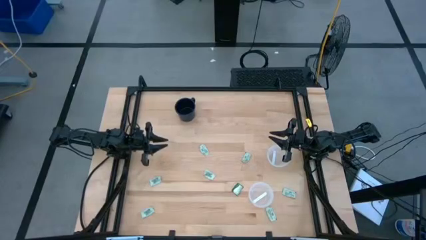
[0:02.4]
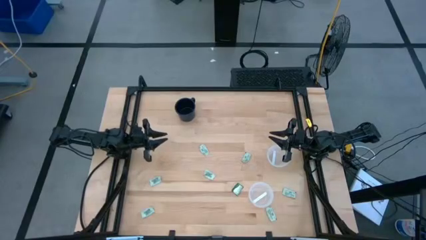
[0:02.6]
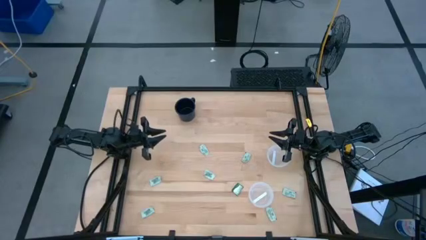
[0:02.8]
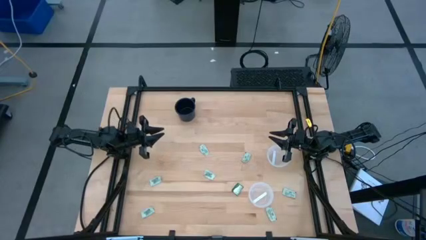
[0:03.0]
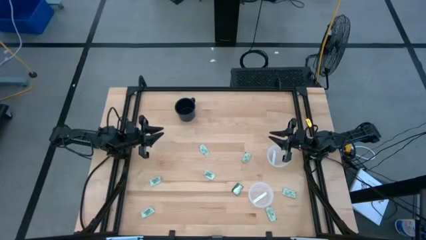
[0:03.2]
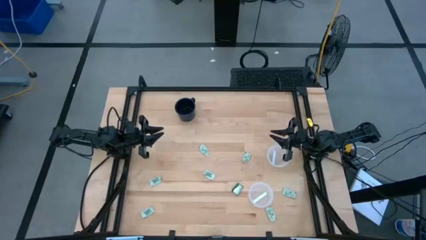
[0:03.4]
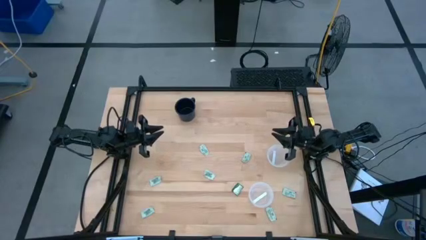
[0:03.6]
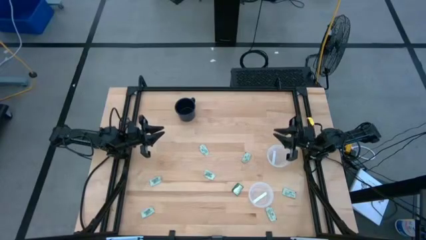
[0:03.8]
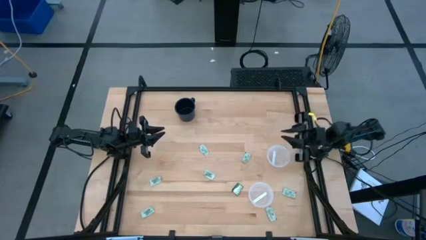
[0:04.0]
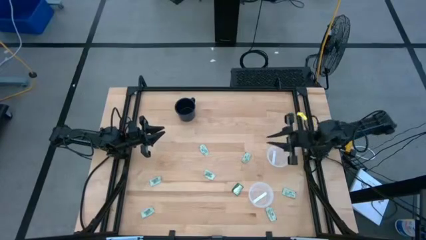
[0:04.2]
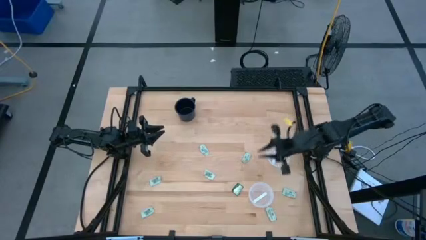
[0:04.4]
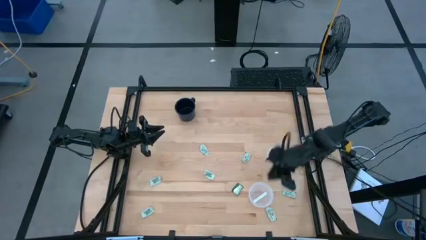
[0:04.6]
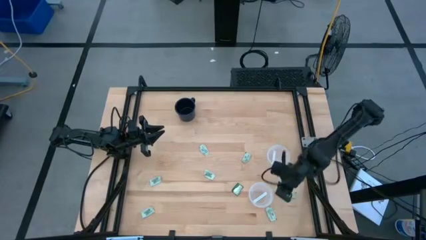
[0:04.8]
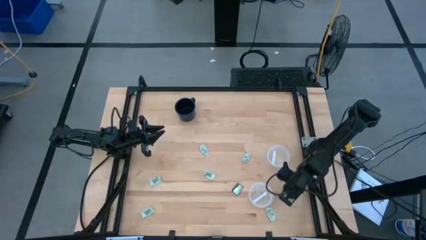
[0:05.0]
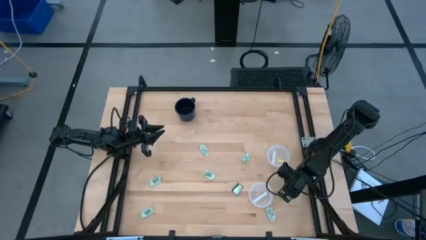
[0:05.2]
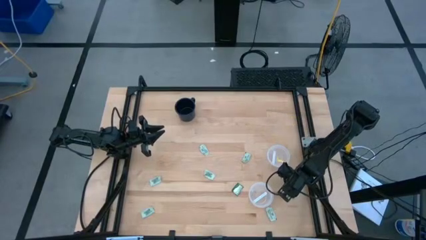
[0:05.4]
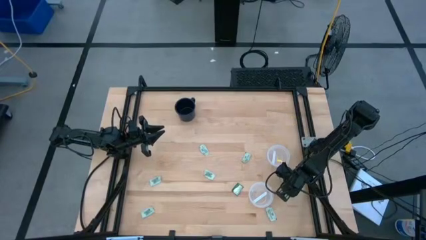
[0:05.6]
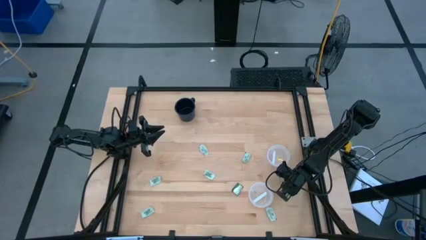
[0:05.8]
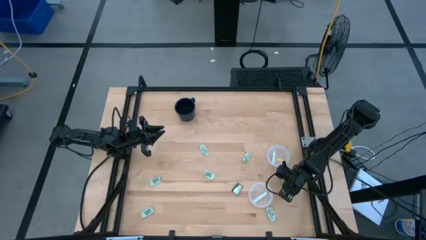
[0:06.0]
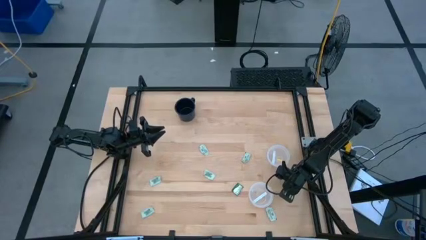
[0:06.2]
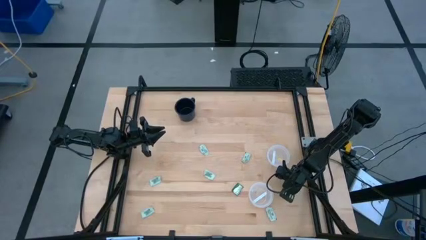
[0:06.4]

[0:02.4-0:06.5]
Task: Pick and place items into bin
Put the white stevia packet into the top bin

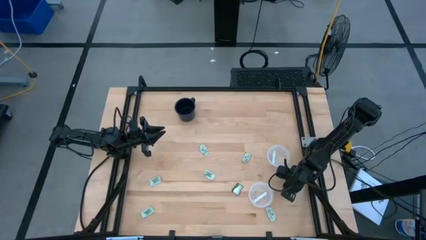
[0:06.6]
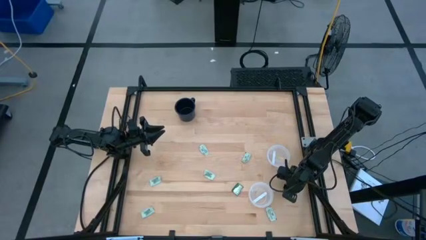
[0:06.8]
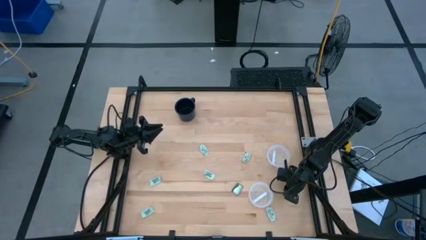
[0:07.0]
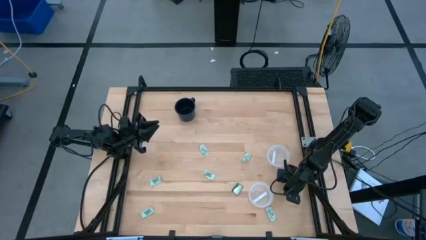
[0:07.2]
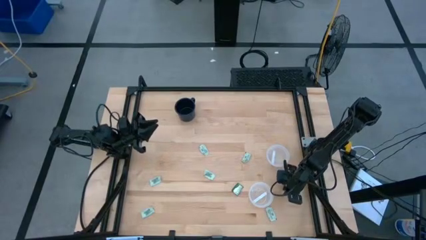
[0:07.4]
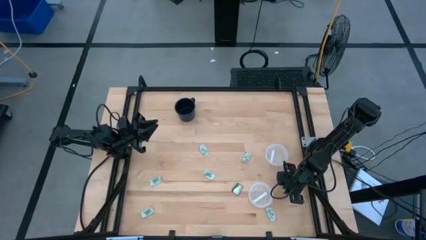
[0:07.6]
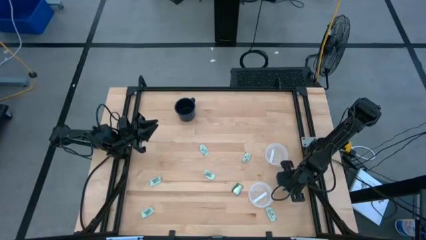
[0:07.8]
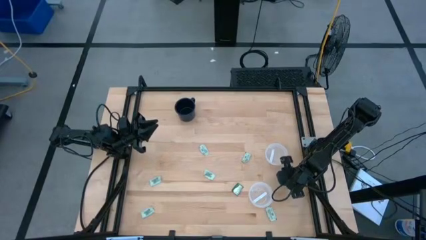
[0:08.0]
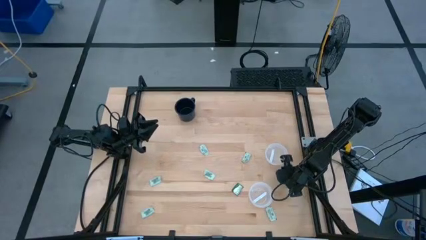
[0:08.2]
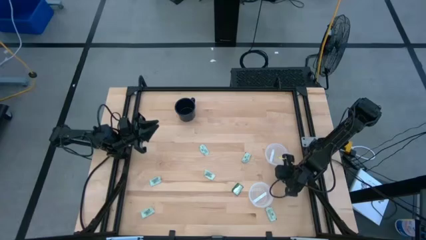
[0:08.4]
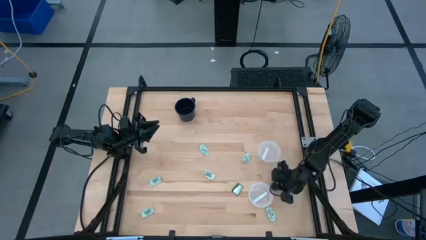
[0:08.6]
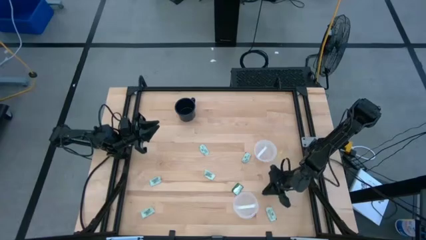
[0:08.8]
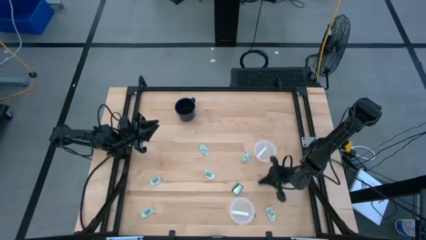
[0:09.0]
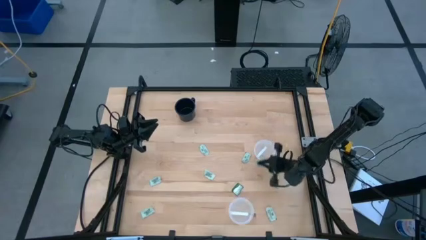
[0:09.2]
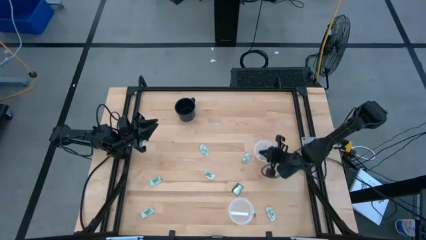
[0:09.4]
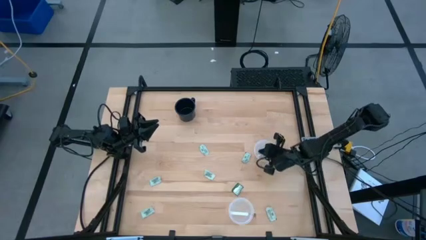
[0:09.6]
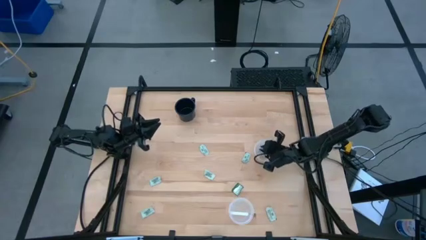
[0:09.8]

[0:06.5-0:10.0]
Put the white stevia packet into the top bin

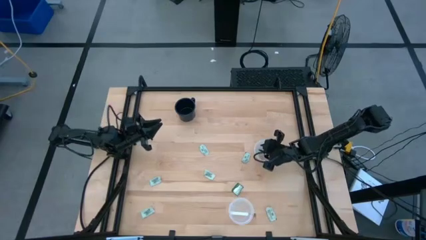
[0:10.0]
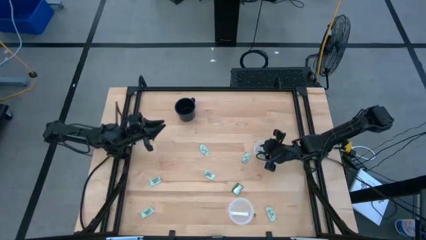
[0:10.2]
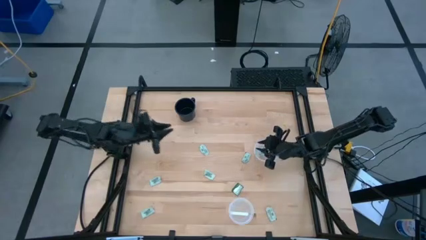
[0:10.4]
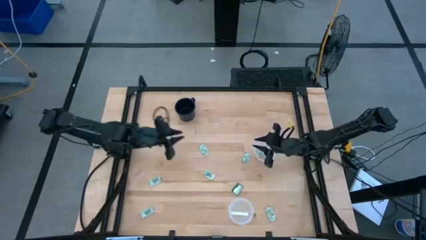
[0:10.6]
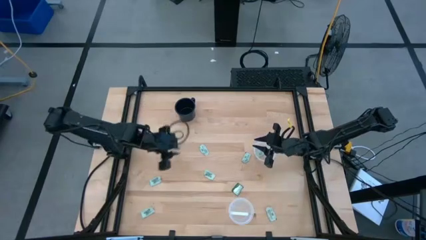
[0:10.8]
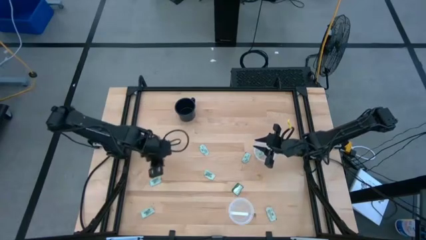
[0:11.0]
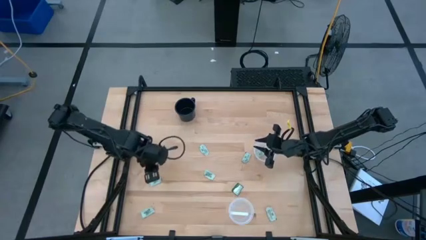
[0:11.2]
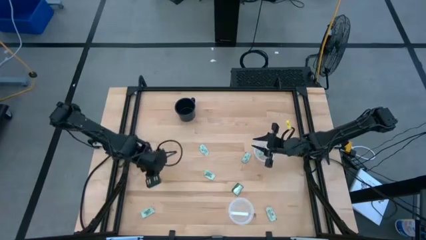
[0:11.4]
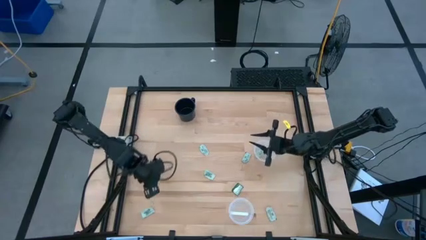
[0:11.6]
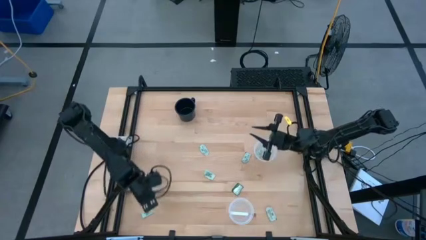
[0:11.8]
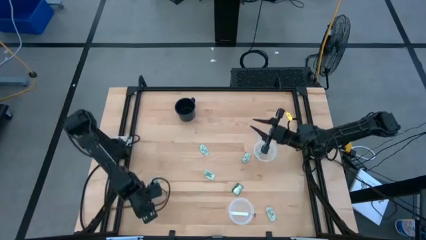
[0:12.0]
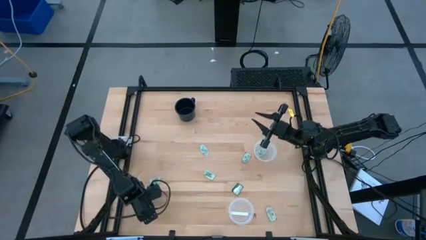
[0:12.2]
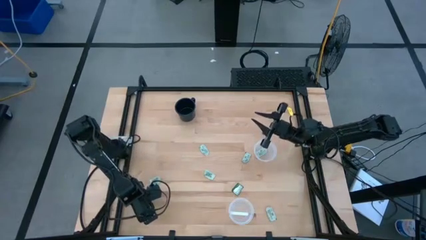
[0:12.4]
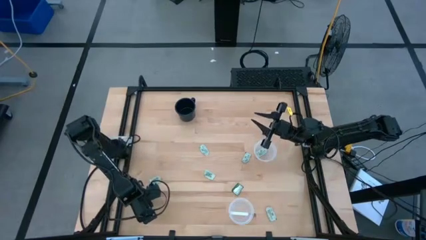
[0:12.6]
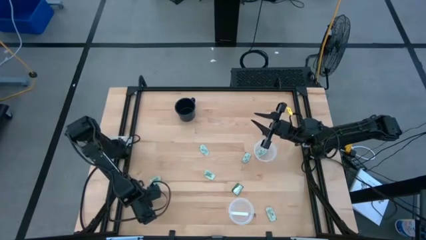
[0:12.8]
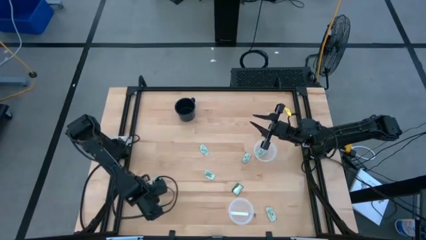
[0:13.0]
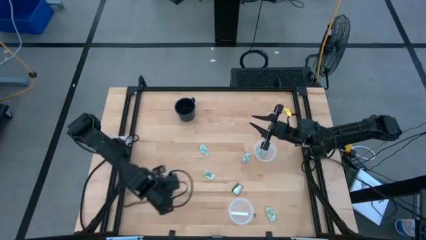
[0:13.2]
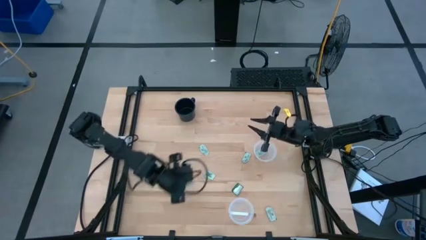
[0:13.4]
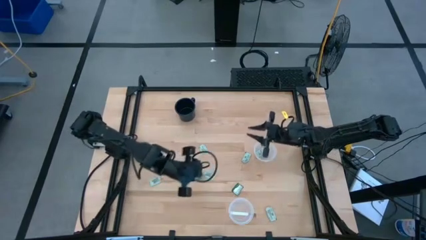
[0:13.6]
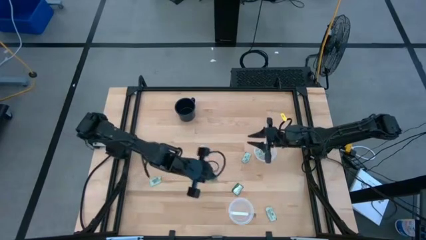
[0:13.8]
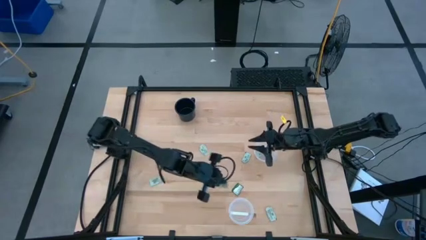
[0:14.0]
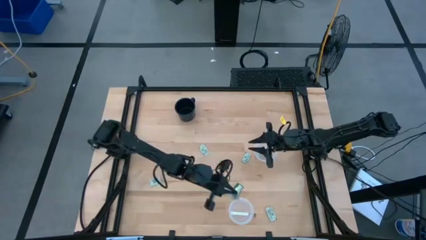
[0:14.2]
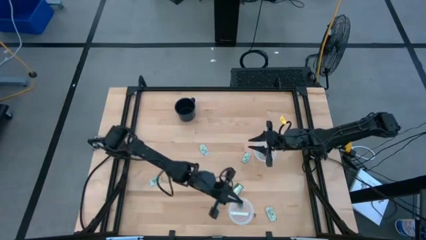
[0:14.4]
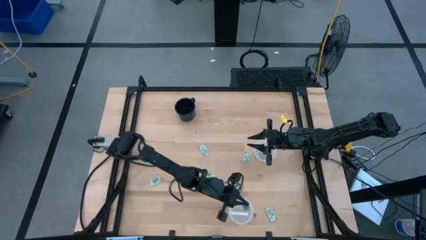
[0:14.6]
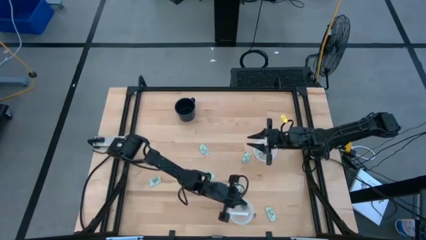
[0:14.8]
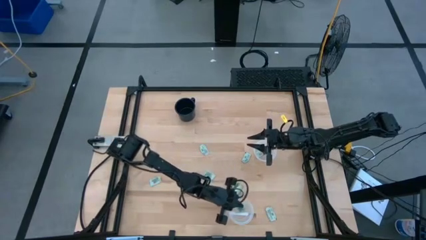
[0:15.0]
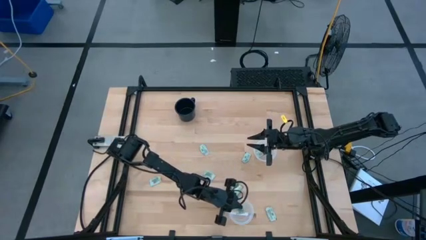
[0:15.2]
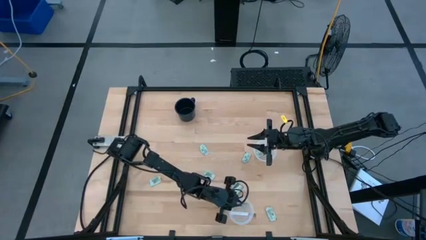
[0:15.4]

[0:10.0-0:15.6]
Put the white stevia packet into the bottom bin

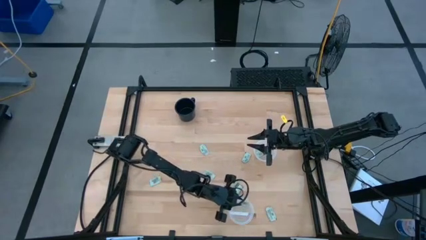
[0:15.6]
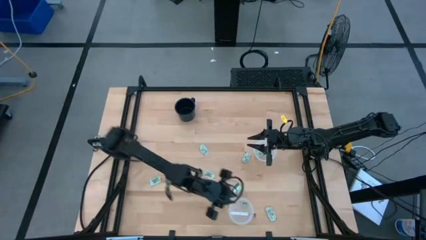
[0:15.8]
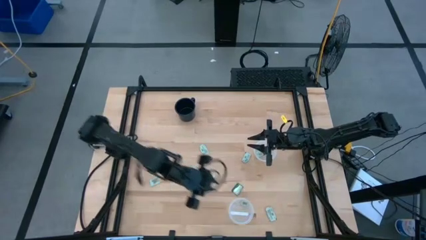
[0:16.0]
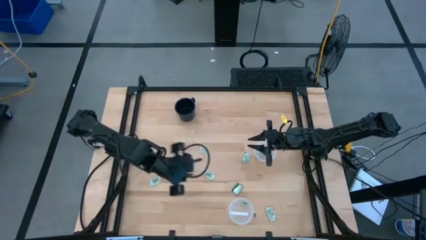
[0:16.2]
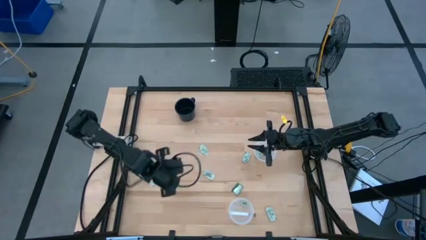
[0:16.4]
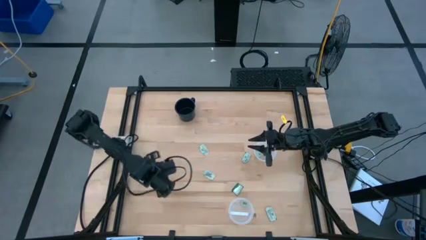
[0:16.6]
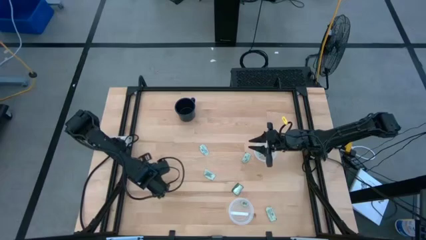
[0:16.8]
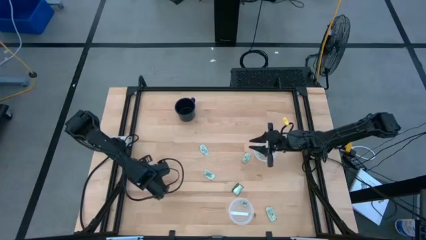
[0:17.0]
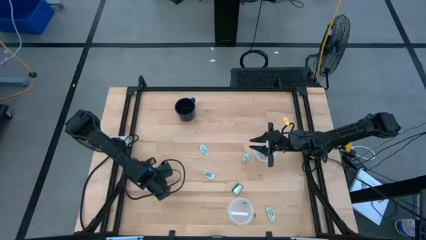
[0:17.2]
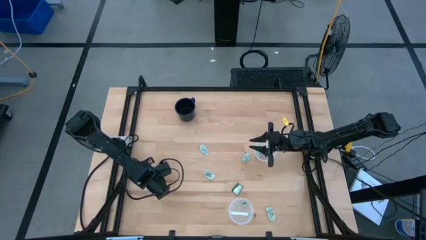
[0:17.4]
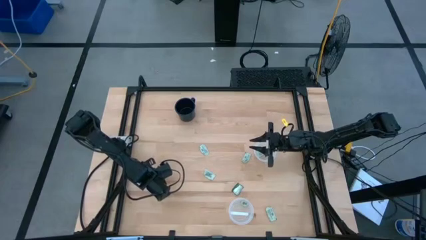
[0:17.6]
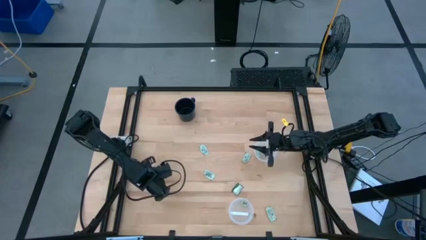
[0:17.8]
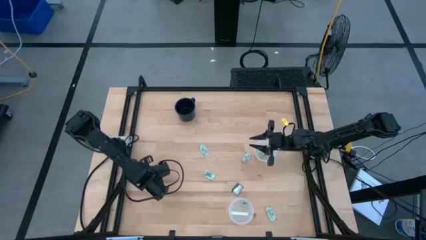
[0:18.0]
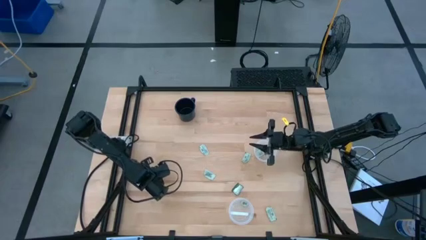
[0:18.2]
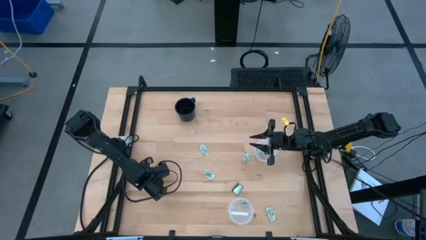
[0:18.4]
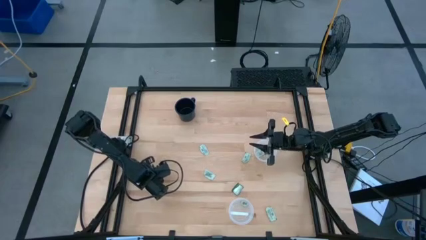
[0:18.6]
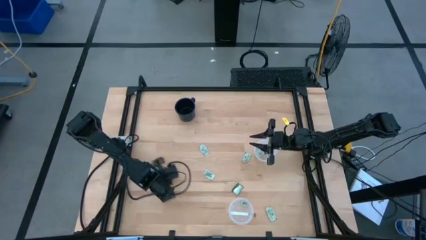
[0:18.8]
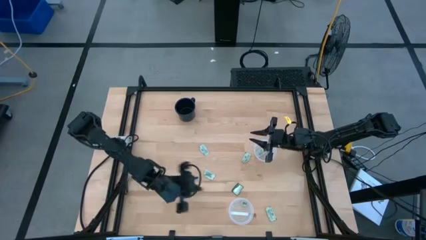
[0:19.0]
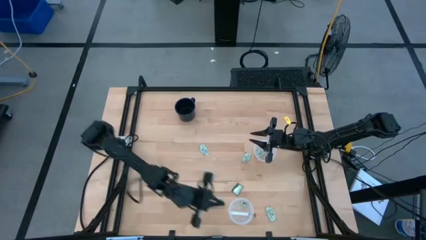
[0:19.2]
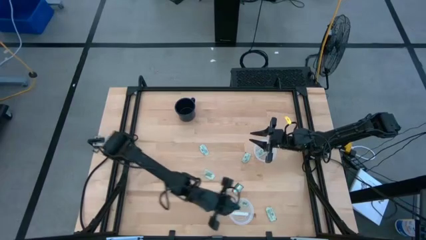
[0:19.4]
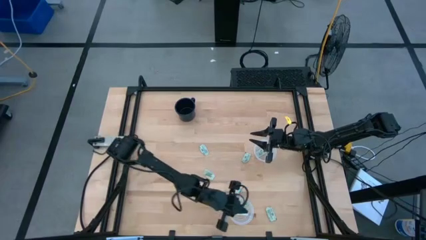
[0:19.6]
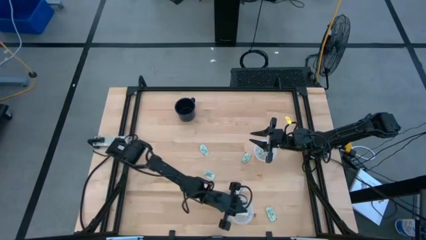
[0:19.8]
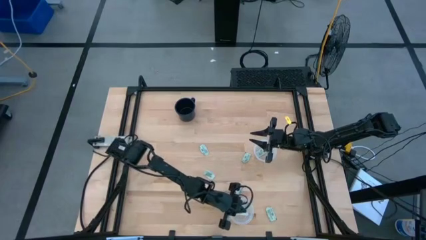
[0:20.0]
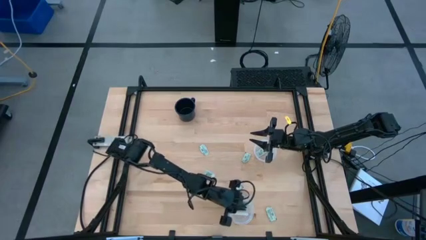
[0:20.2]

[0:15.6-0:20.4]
Put the white stevia packet into the bottom bin
